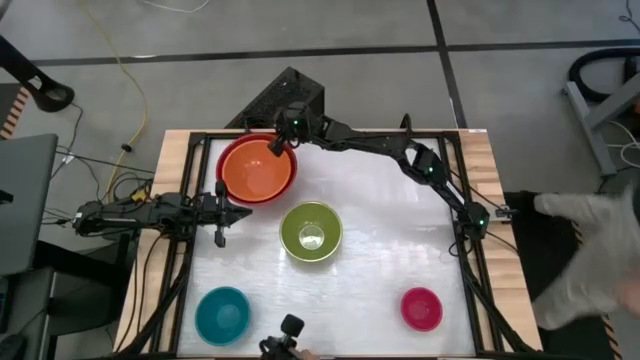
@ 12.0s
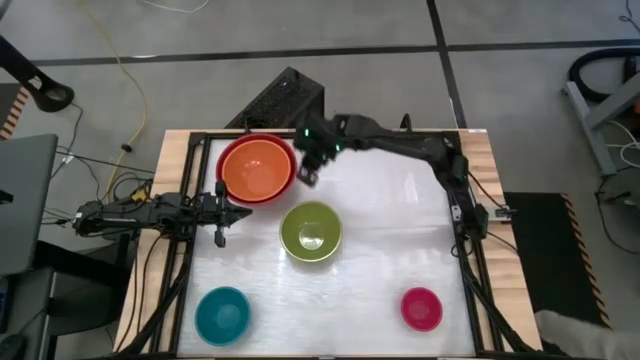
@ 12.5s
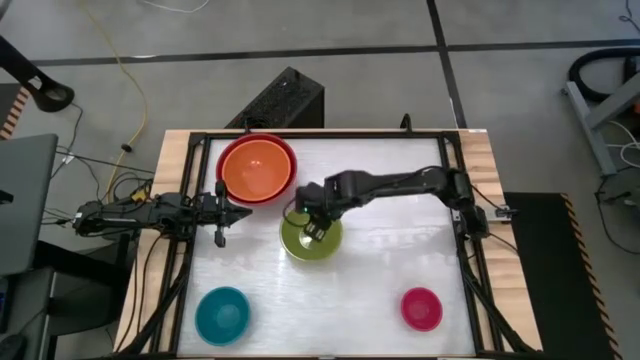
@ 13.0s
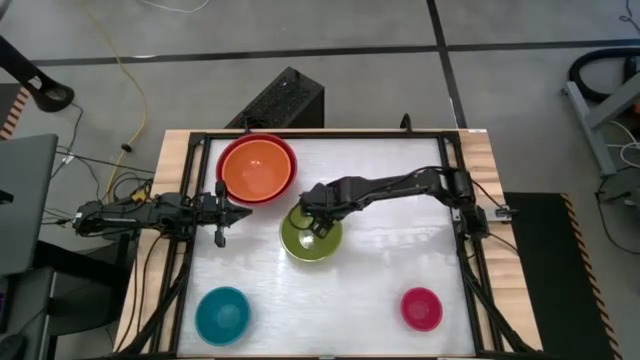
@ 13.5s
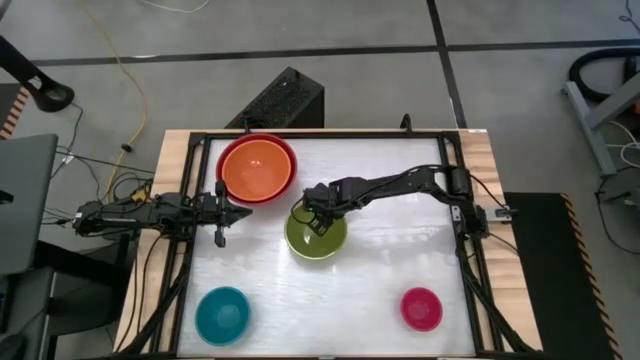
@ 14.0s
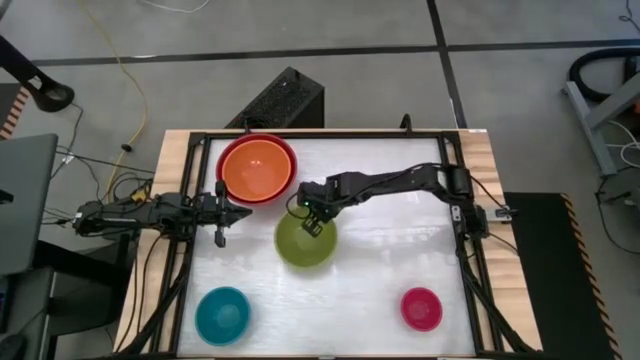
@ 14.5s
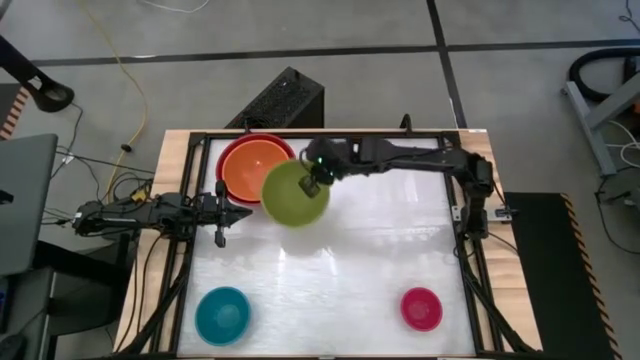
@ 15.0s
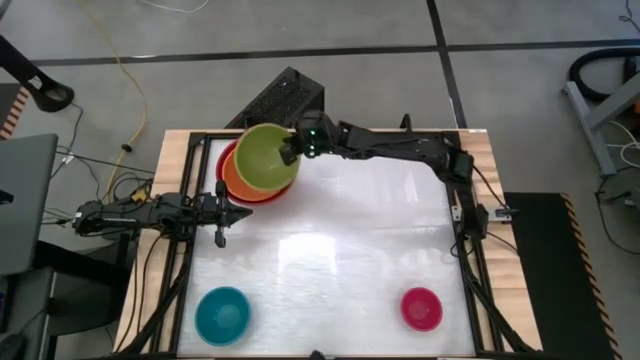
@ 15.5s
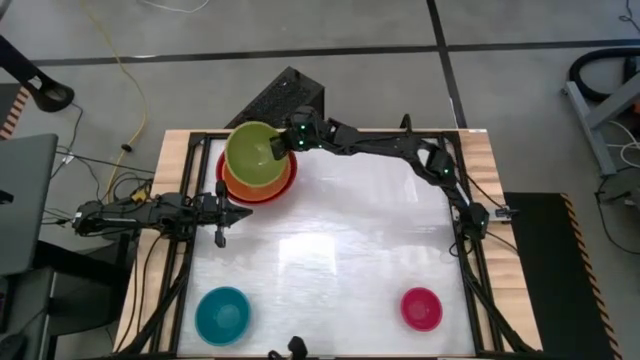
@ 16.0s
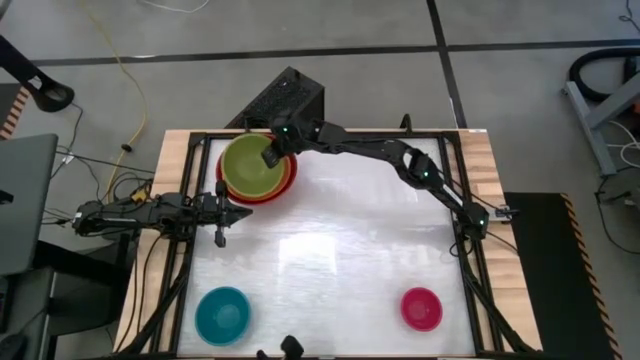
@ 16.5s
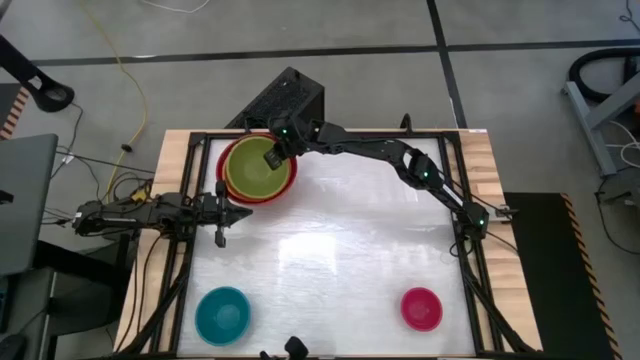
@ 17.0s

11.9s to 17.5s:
Stack the green bowl on top of the orange bowl

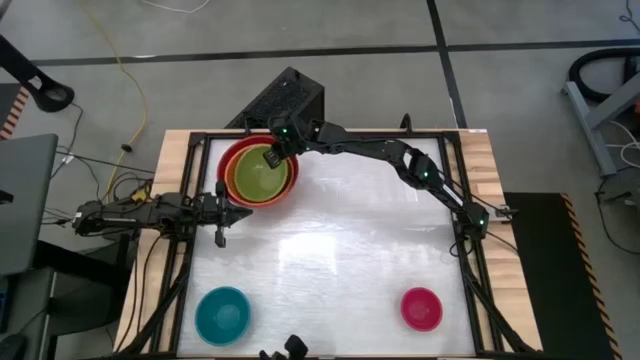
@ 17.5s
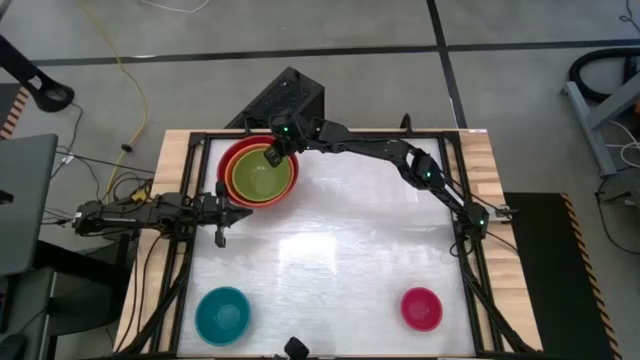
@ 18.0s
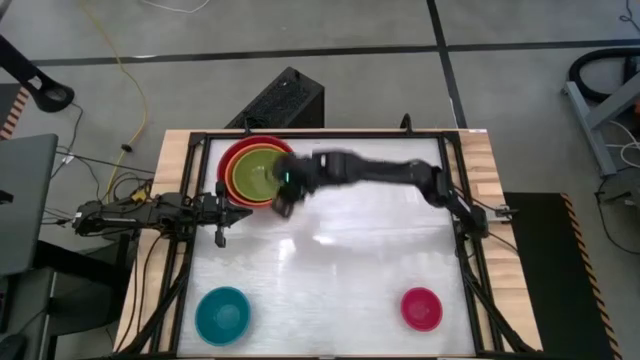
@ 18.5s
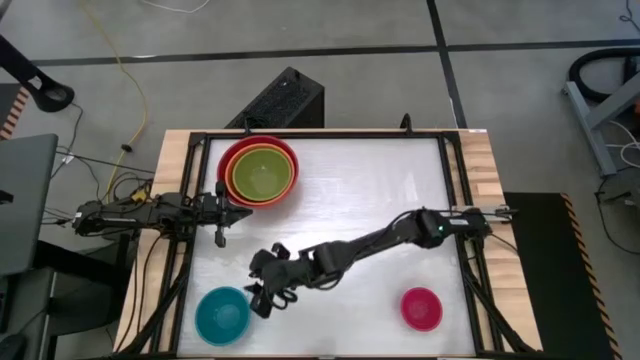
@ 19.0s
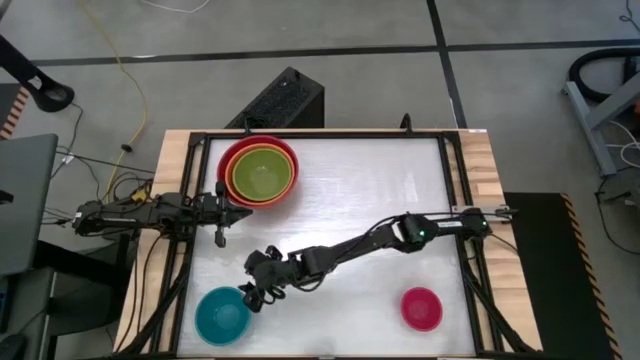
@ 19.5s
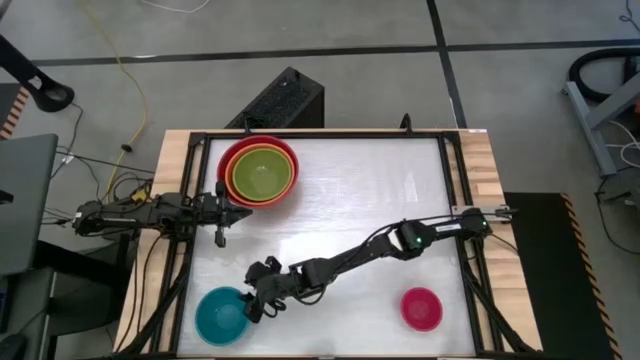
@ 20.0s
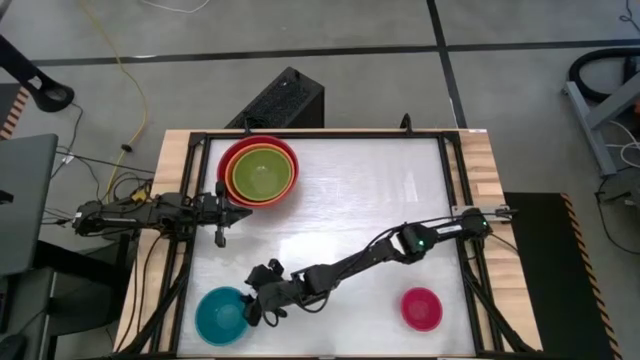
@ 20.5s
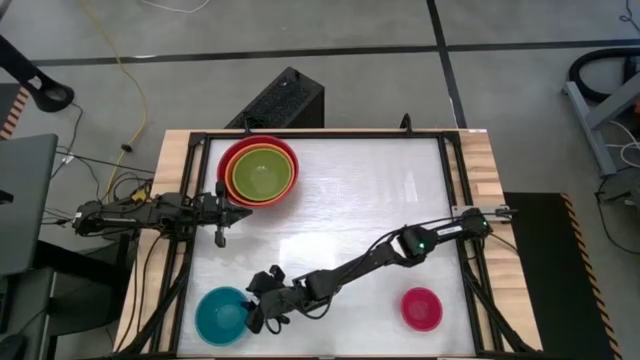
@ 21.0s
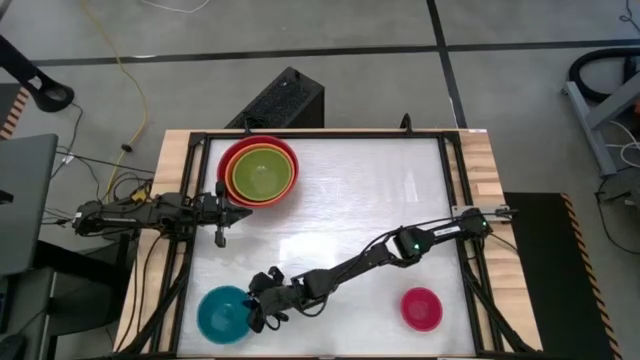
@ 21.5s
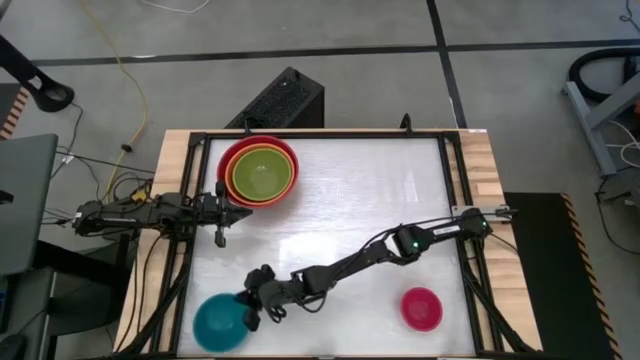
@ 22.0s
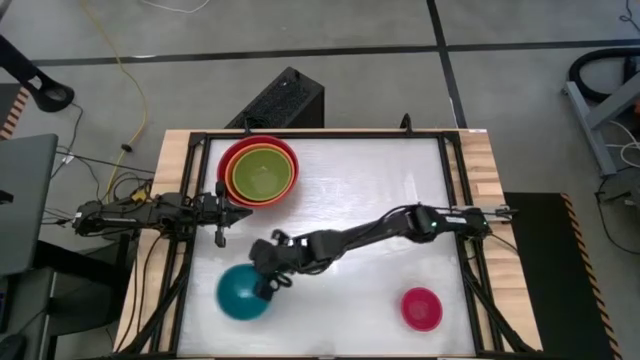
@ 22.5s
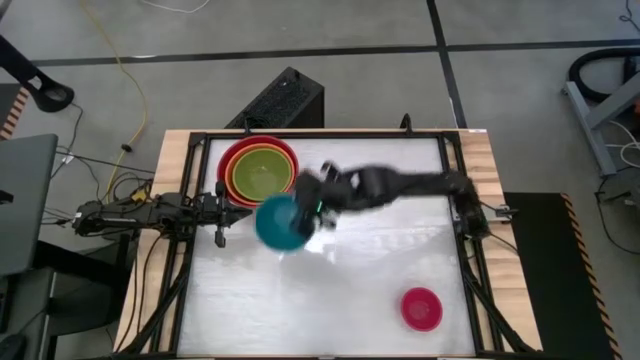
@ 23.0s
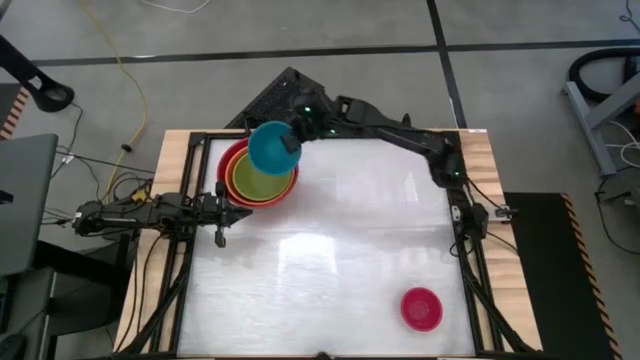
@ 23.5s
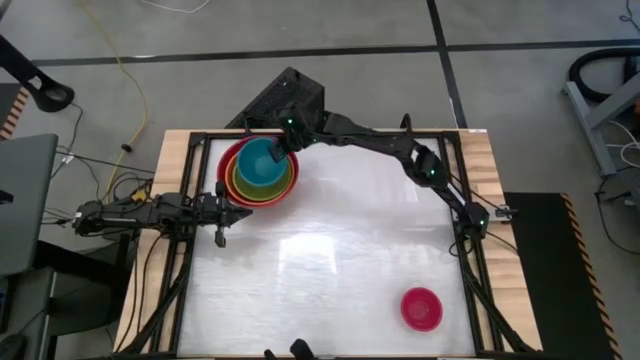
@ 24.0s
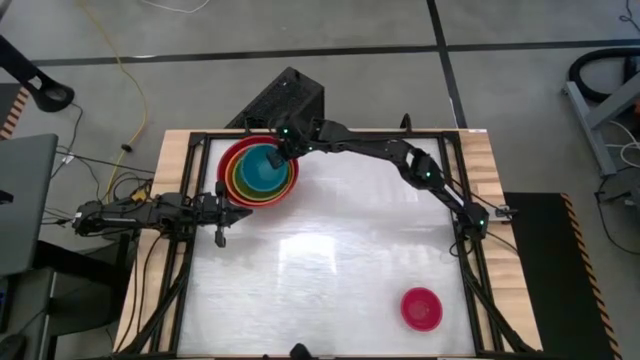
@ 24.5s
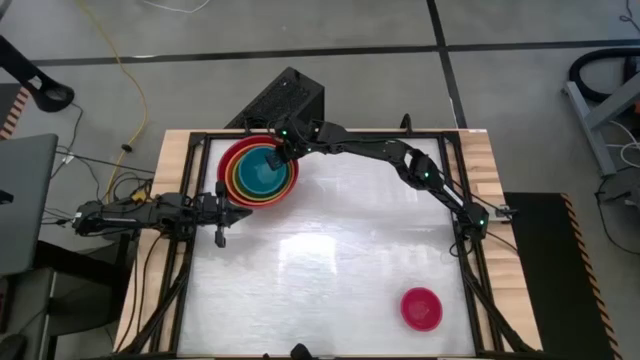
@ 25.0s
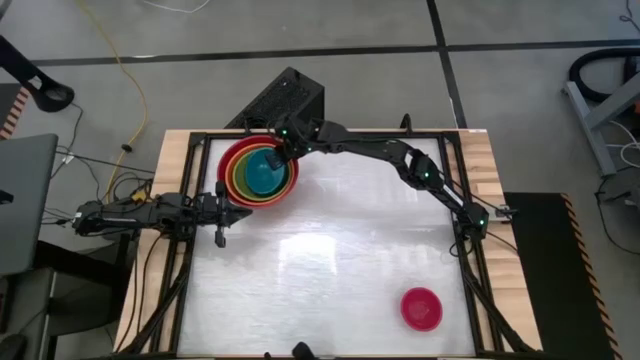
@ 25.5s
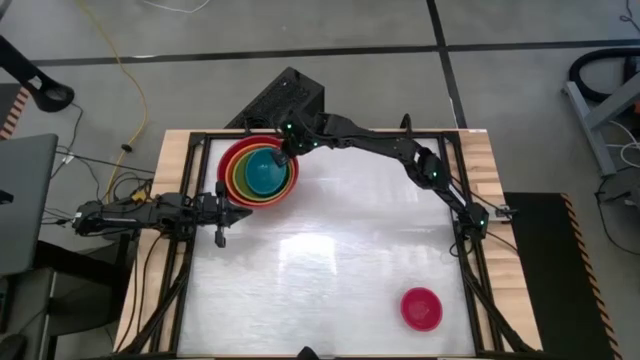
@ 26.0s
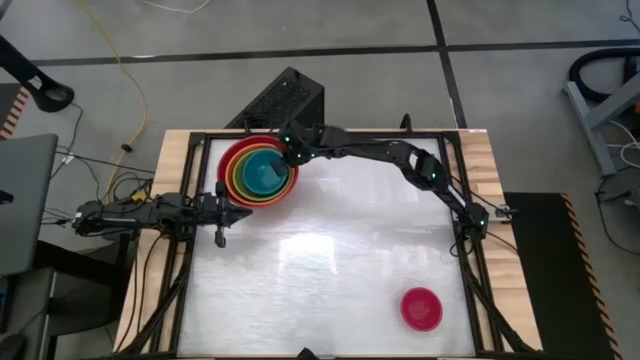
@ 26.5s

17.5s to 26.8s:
Stack the blue bowl on top of the green bowl

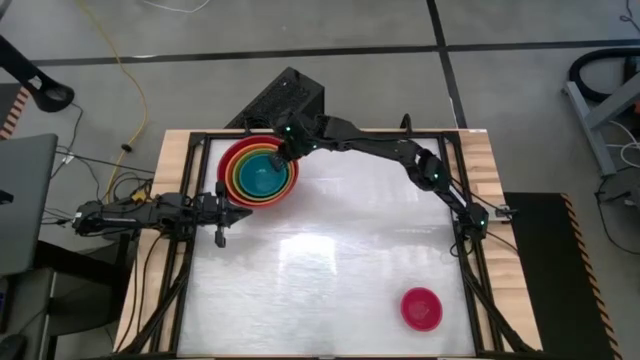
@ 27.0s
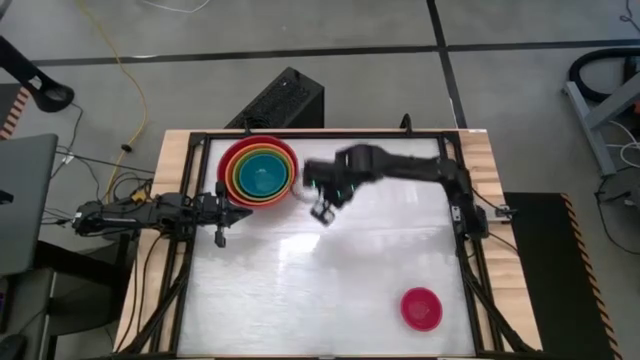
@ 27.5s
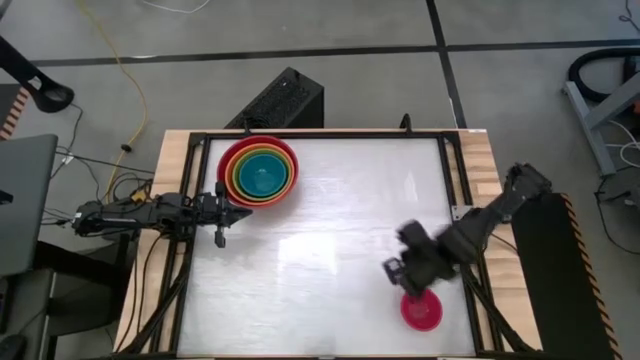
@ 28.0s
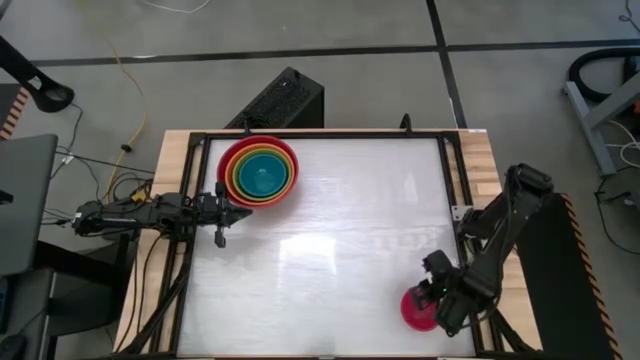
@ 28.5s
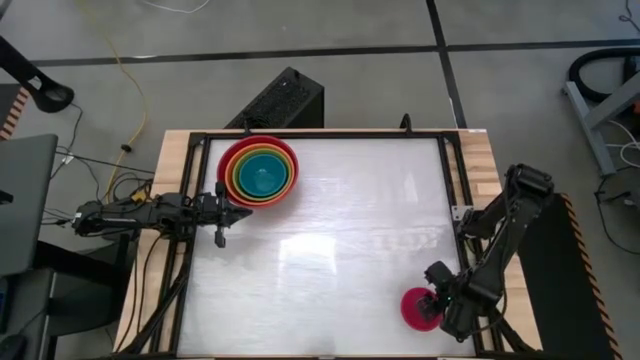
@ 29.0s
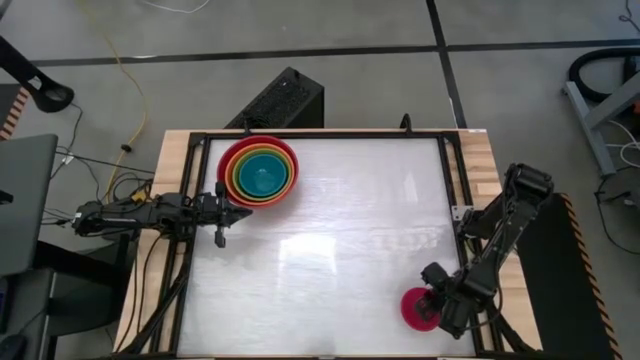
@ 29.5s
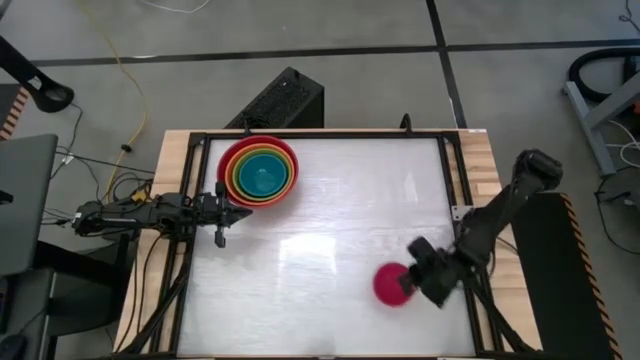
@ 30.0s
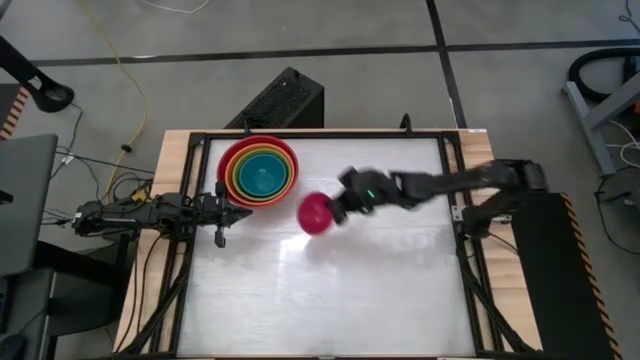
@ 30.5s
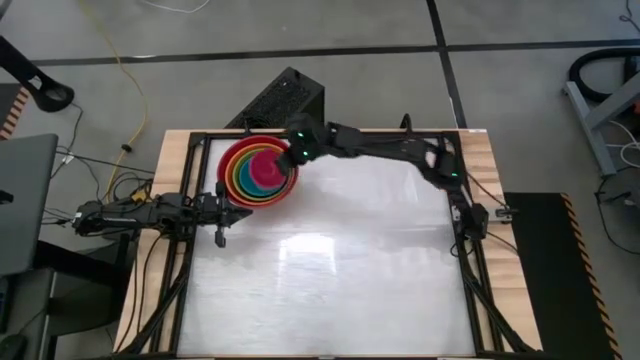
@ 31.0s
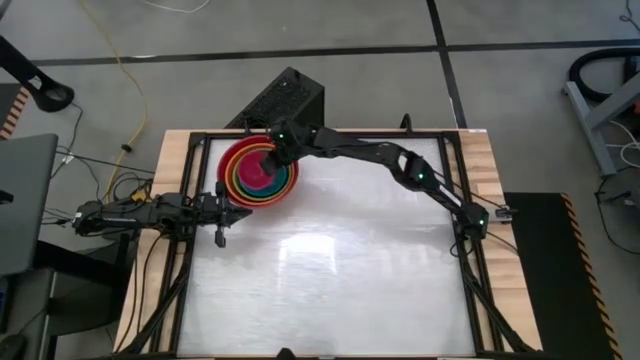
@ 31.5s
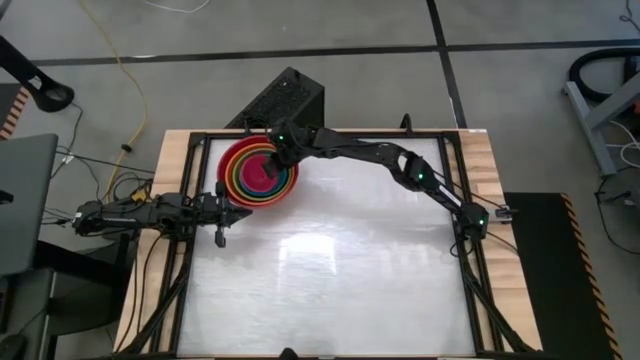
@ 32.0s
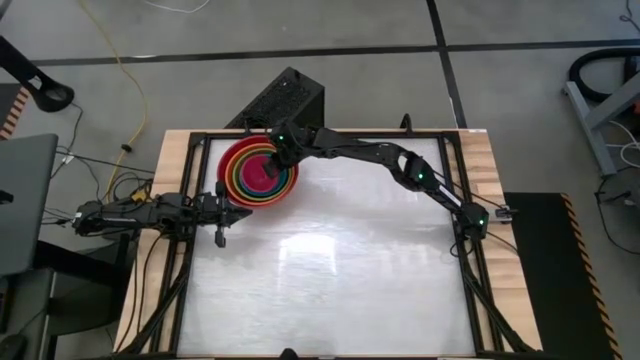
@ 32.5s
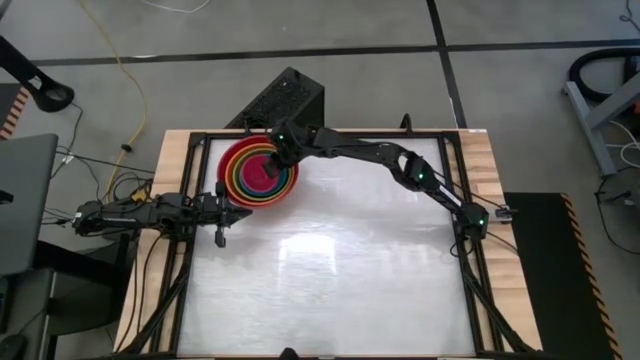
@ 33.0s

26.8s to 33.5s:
Stack the red bowl on top of the blue bowl
